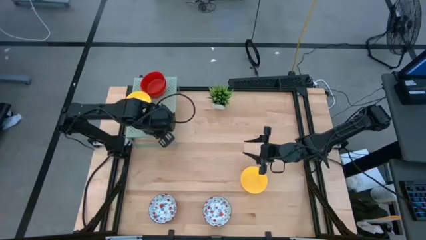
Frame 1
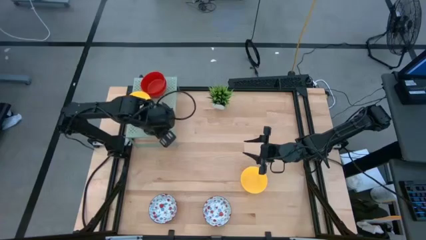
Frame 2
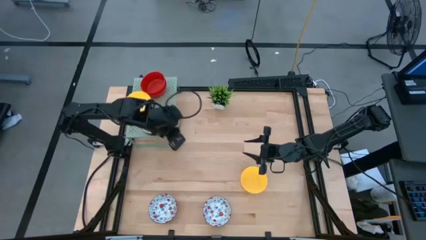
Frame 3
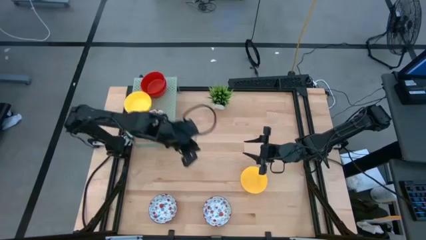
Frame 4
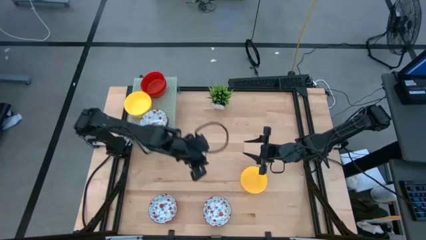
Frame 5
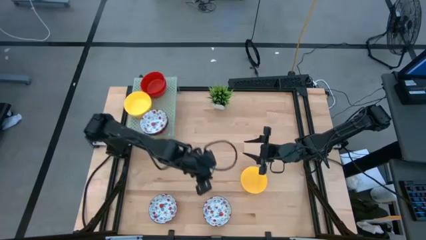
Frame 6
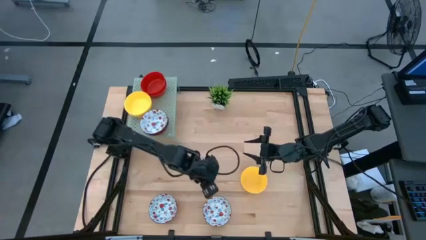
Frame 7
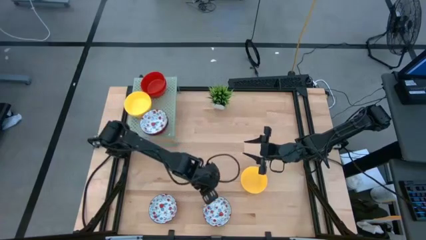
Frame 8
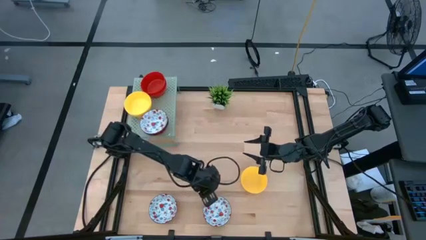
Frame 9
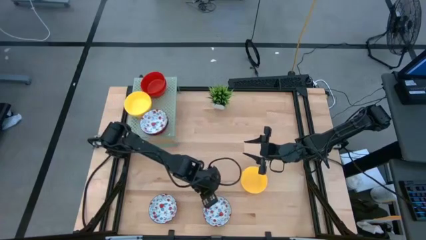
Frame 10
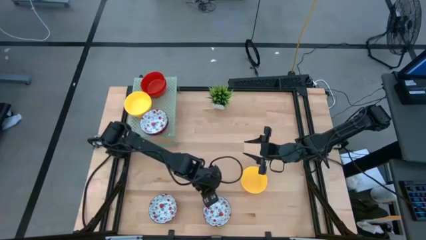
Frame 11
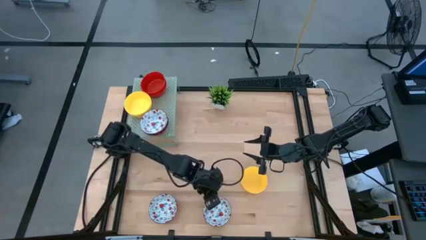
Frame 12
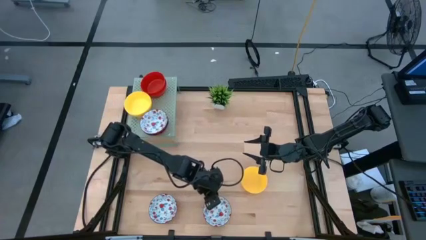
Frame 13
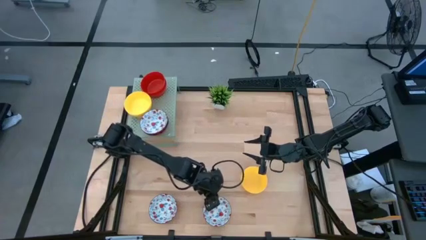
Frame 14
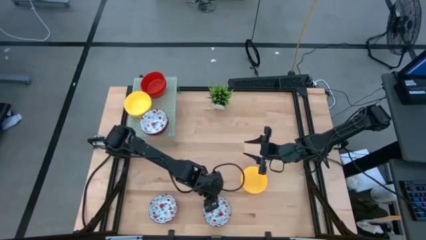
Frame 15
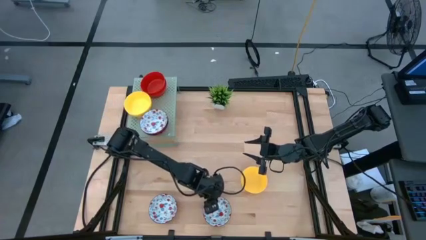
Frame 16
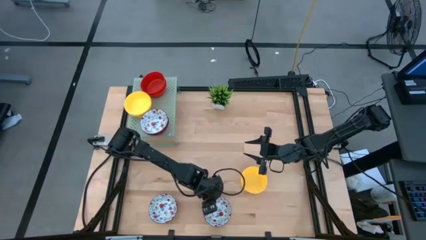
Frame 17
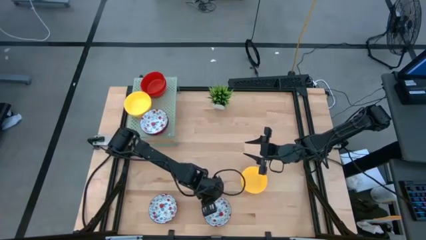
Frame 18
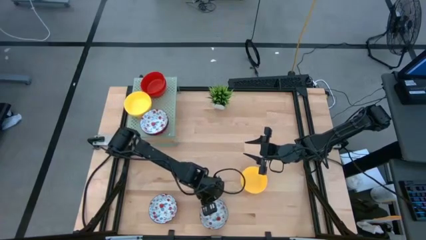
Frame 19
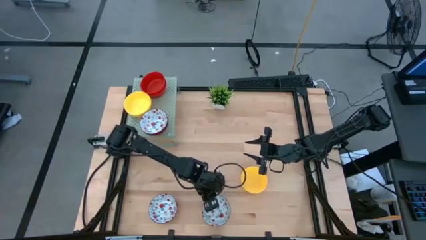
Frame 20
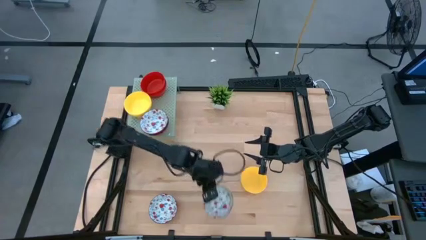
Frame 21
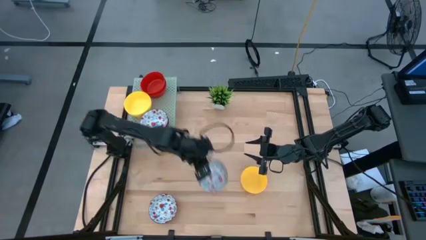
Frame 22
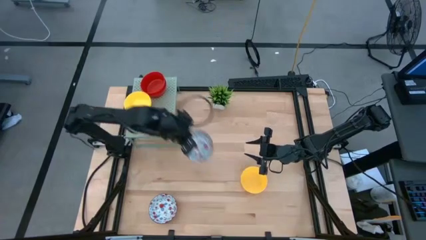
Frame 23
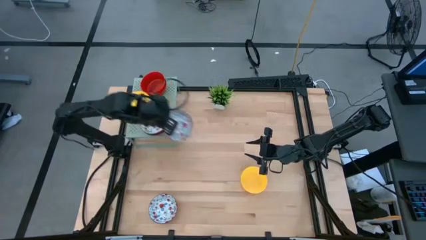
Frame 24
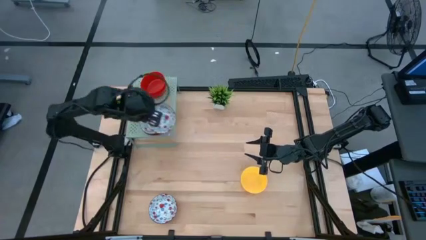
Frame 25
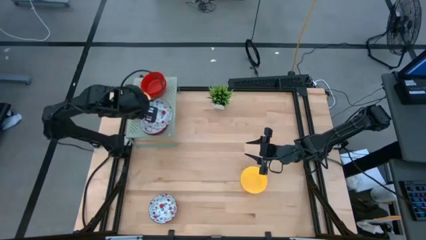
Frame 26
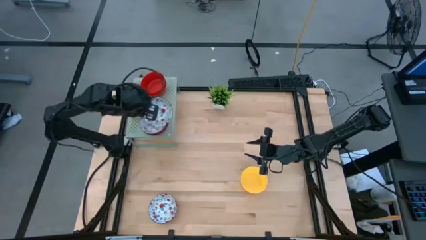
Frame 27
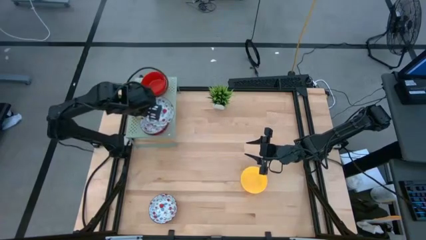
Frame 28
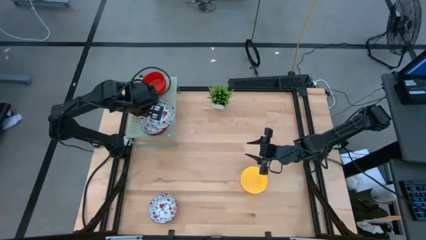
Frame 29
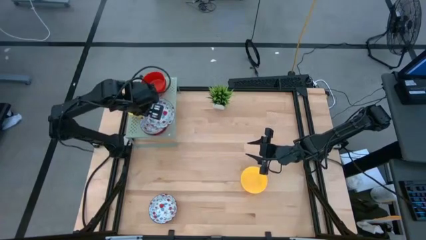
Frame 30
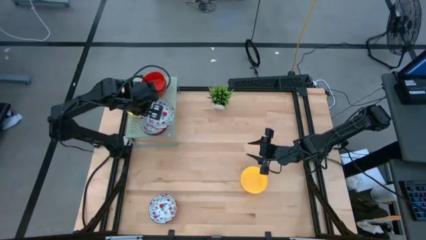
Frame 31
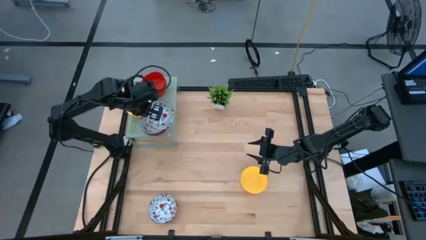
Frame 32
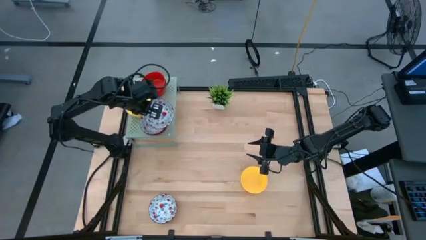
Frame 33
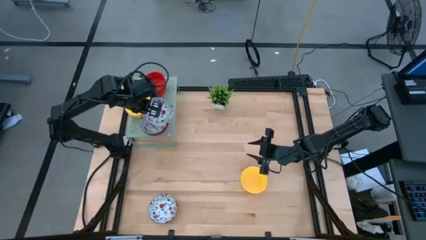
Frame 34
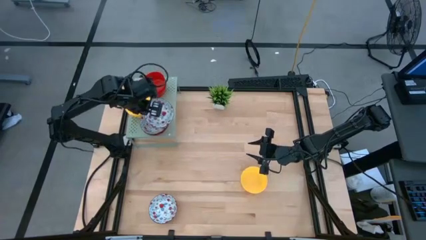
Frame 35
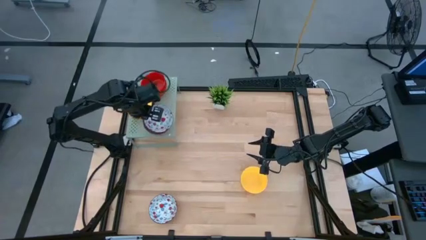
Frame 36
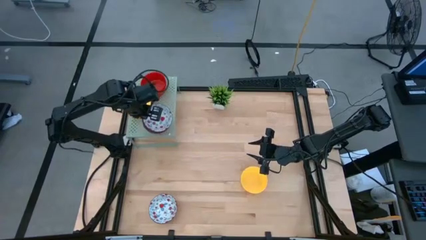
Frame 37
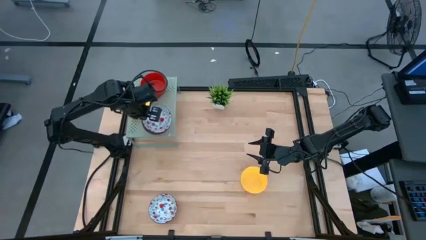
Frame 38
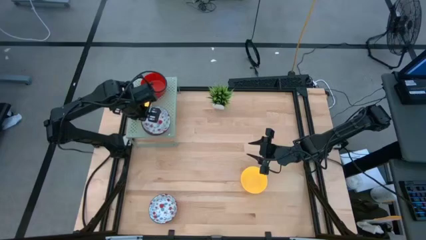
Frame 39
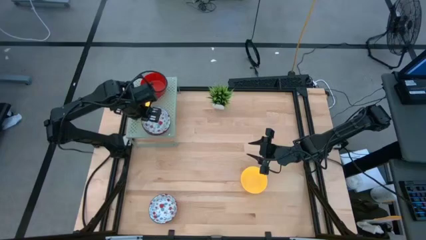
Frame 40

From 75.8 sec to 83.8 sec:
Task: Pick & Place Mini bowls
Stack the red and white bowl on the red and white bowls on the shelf

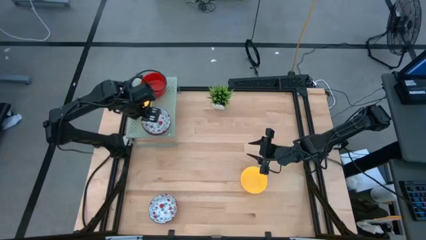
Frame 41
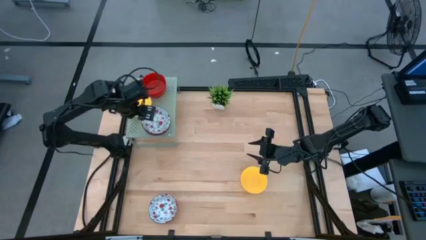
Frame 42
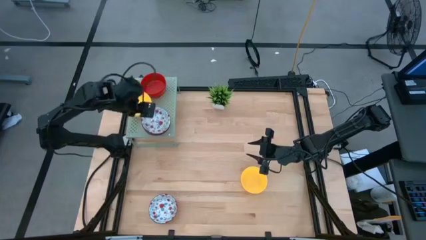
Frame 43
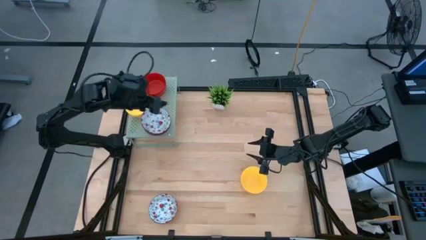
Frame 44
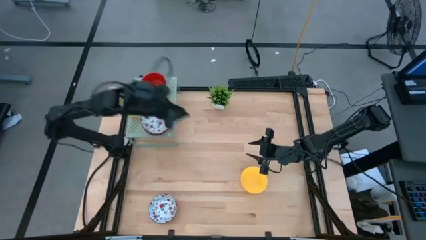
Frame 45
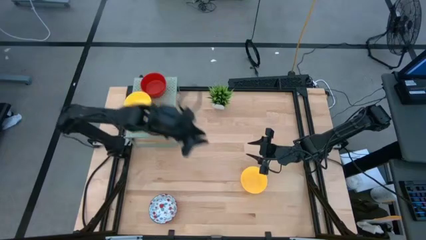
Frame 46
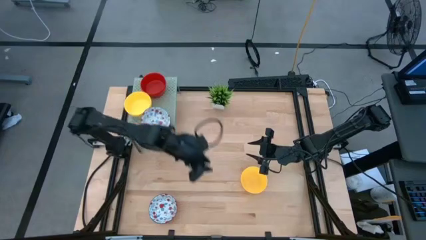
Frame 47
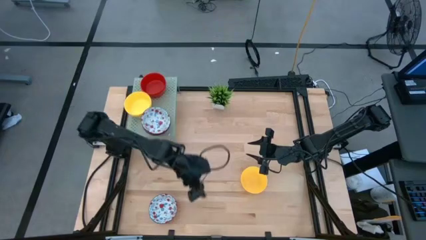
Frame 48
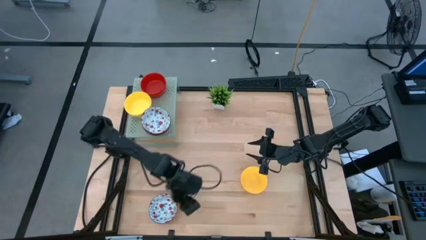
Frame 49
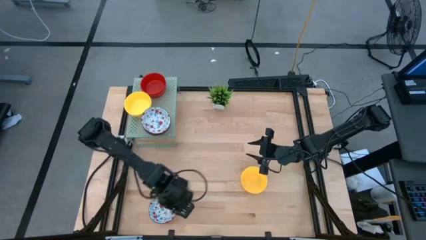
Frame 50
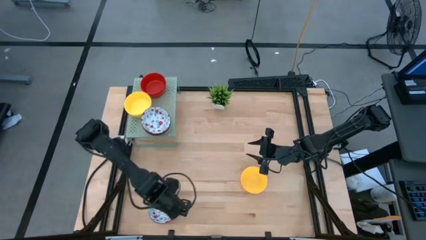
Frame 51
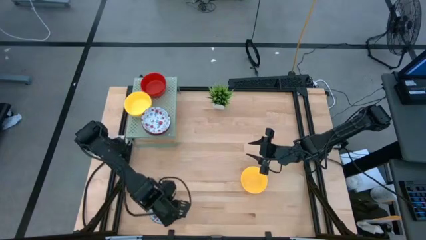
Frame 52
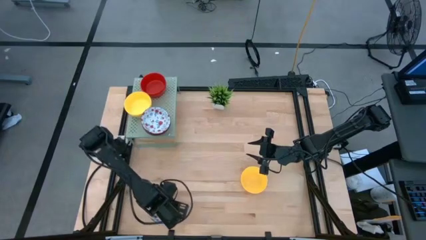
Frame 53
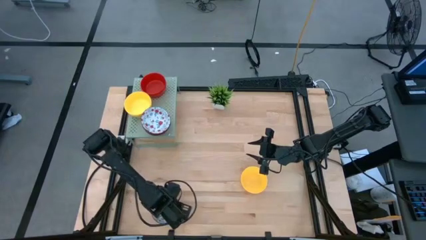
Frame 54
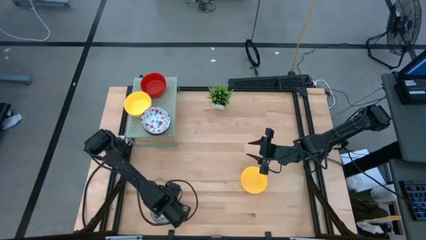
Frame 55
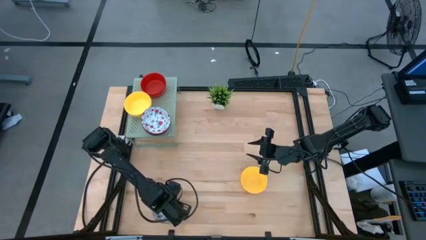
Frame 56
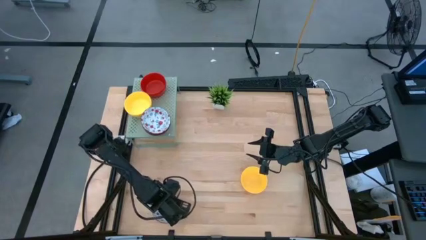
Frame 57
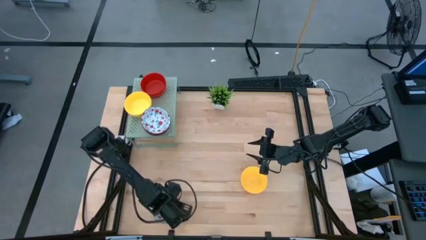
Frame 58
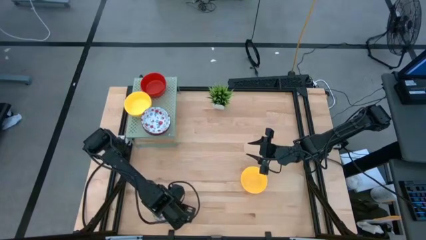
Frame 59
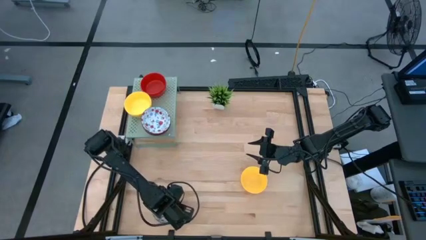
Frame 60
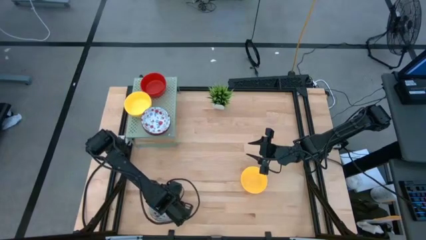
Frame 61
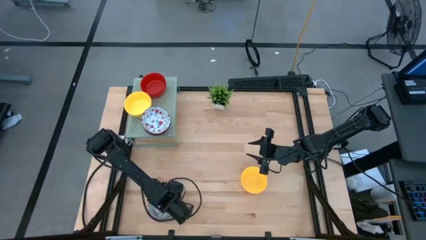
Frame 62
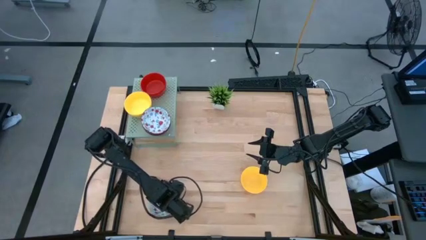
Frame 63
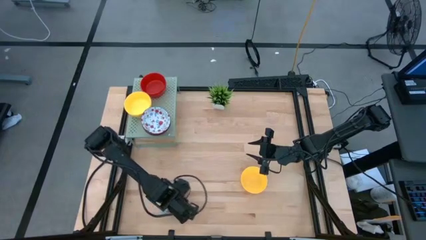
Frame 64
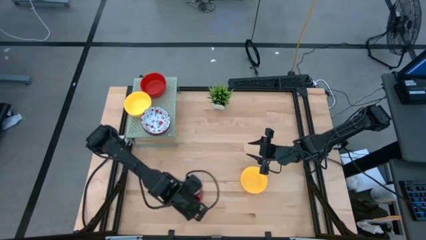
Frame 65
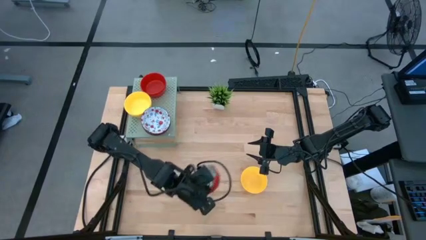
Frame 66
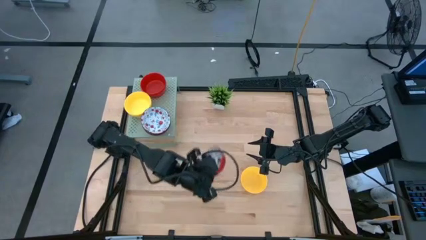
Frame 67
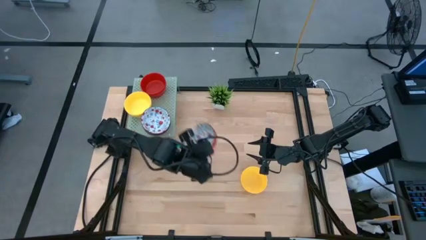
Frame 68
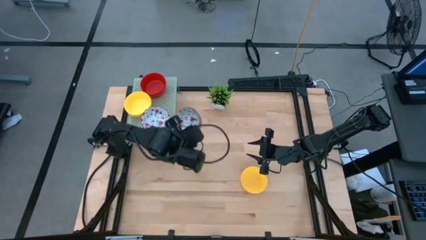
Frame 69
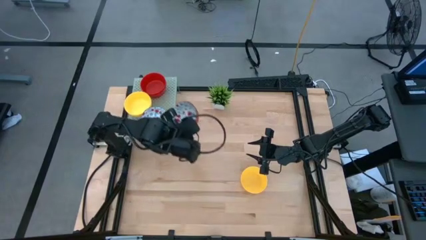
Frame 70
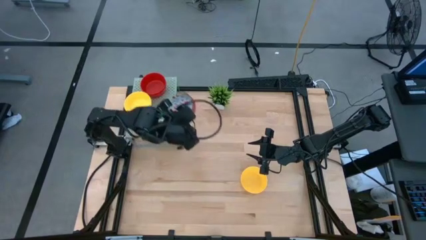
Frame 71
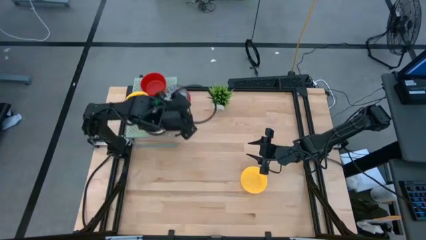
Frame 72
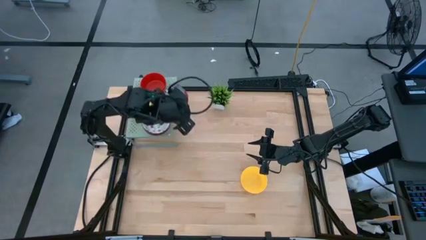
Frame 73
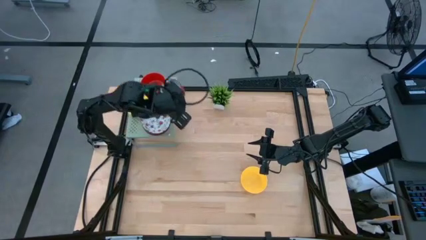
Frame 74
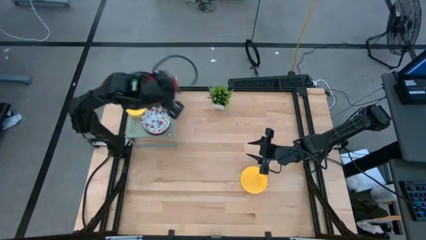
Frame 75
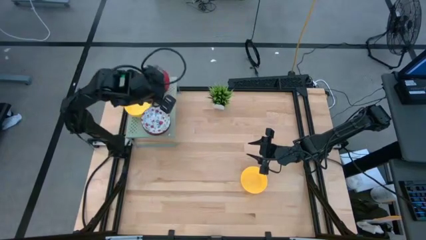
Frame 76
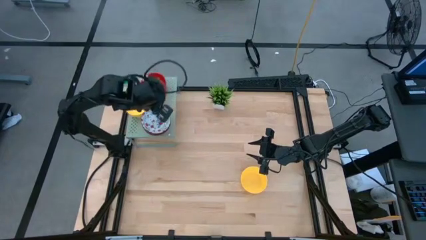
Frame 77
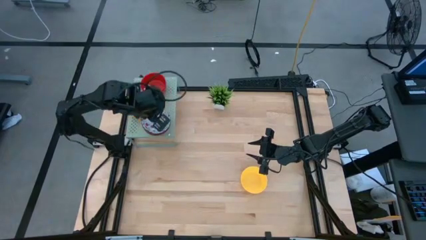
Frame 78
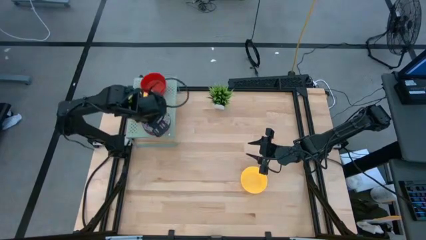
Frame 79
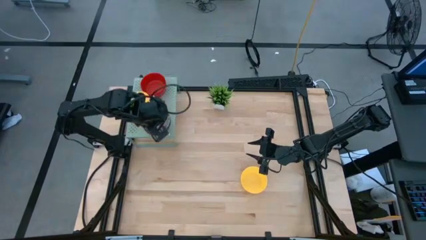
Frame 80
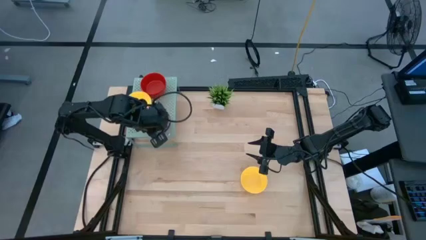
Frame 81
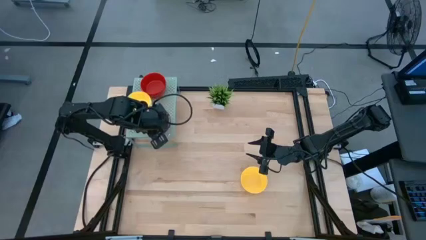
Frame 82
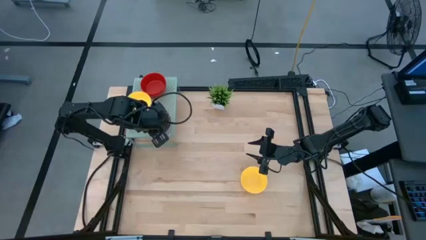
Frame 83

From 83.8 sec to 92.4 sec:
Stack the red and white bowl on the red and white bowls on the shelf

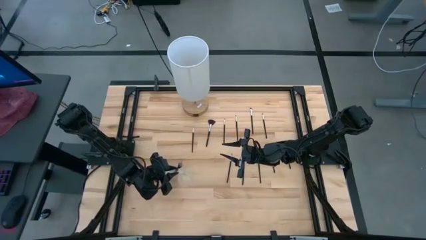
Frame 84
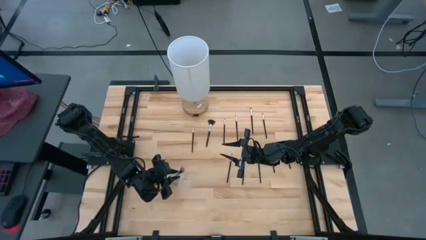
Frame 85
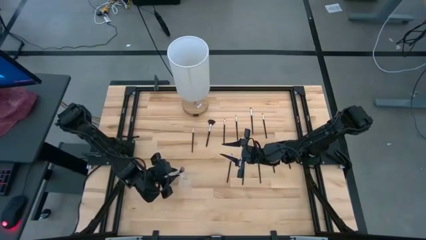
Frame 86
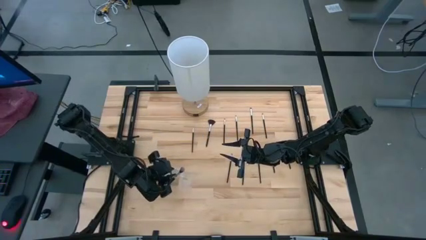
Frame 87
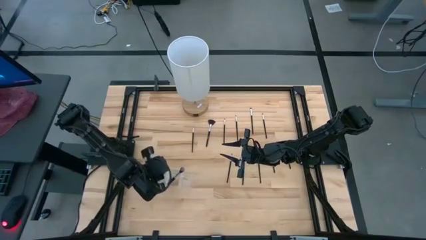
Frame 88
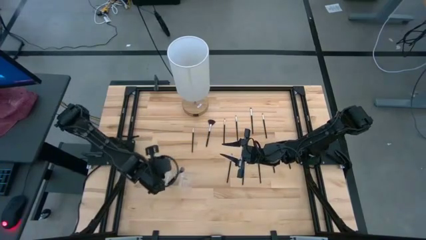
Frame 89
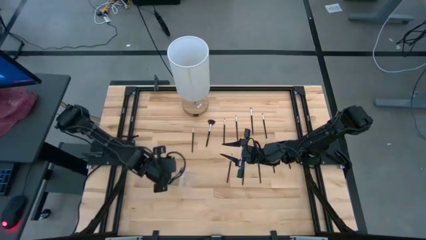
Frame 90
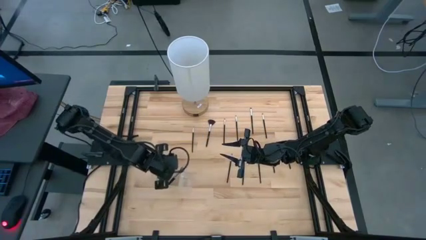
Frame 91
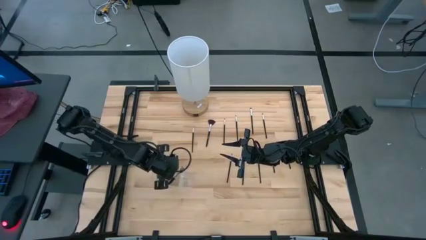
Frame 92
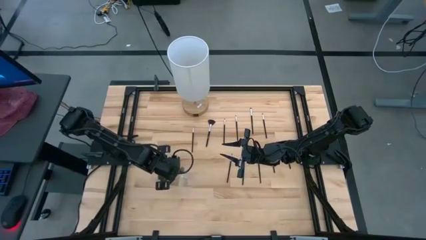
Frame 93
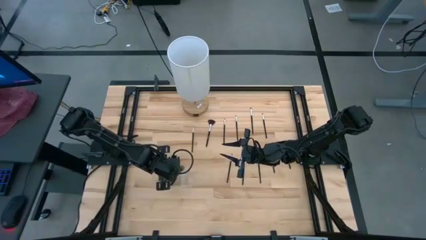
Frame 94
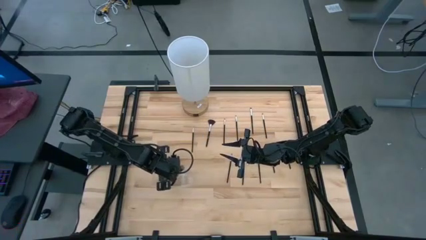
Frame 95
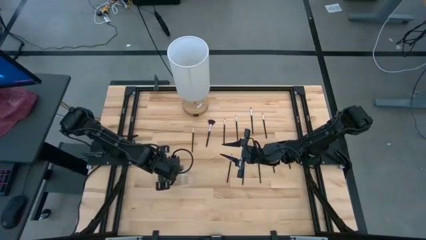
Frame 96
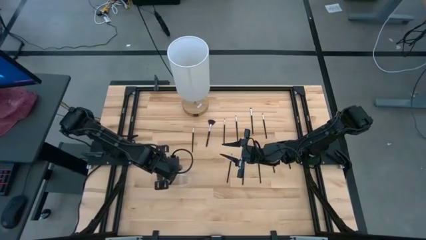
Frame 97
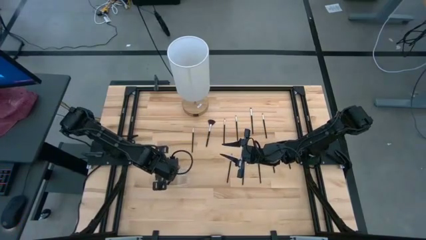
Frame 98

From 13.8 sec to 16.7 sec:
Task: Put items in baskets/containers
Adjust the transparent organizer
